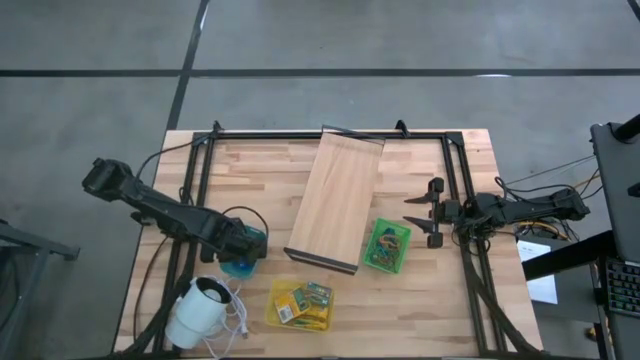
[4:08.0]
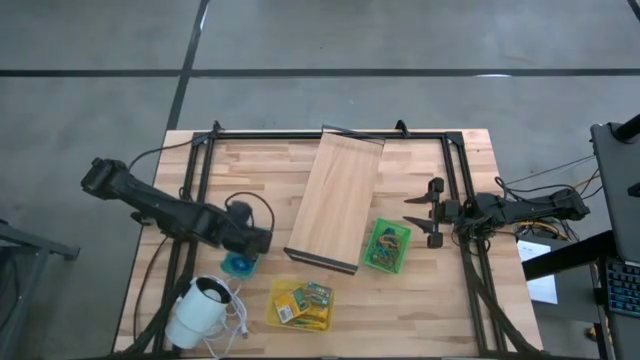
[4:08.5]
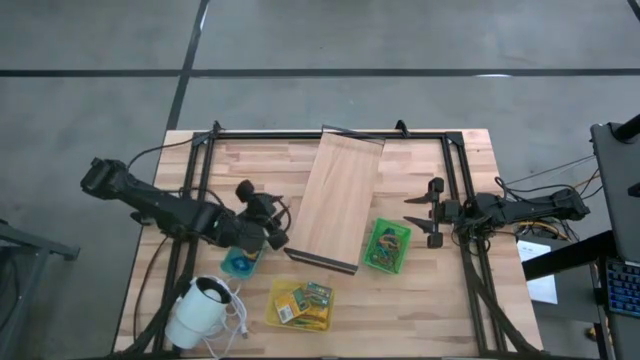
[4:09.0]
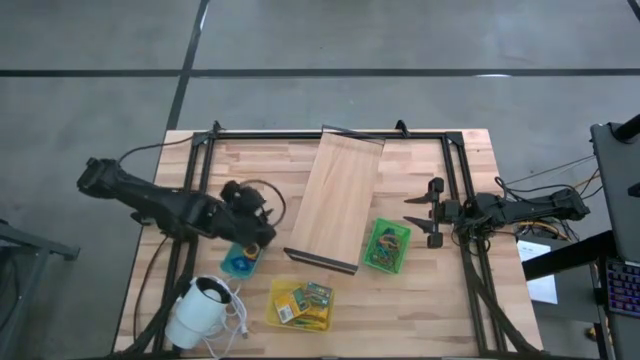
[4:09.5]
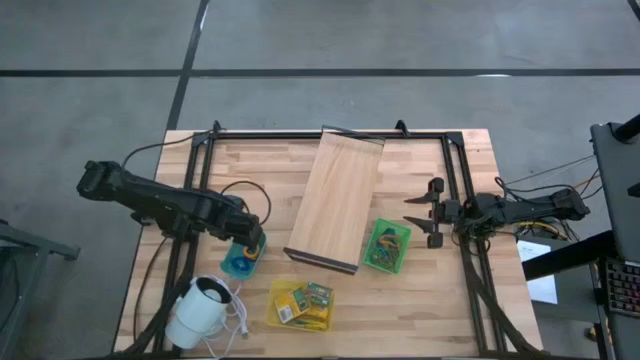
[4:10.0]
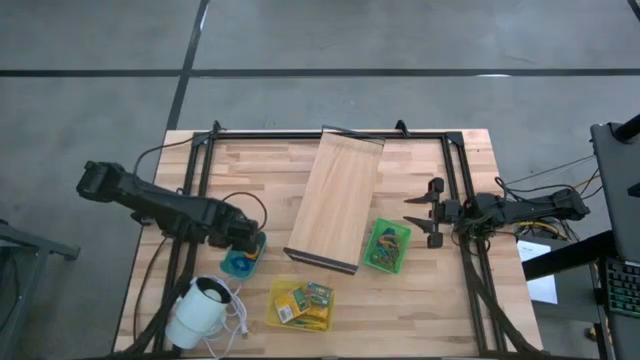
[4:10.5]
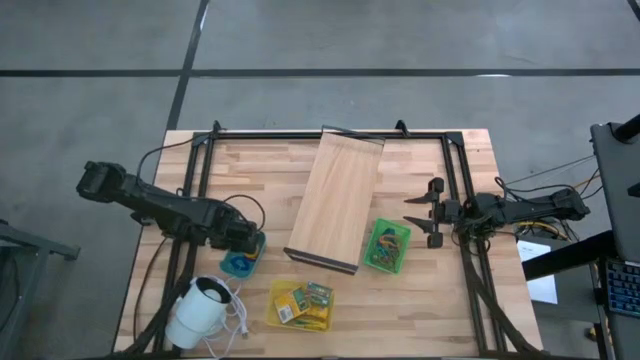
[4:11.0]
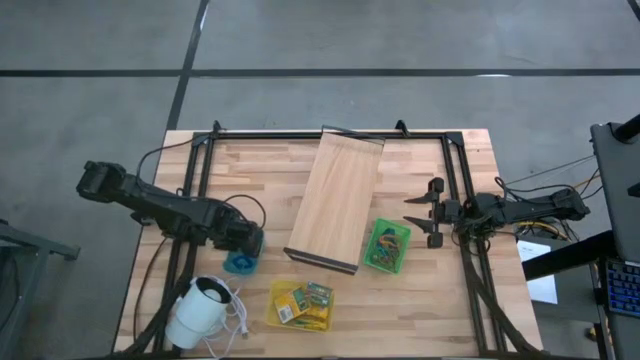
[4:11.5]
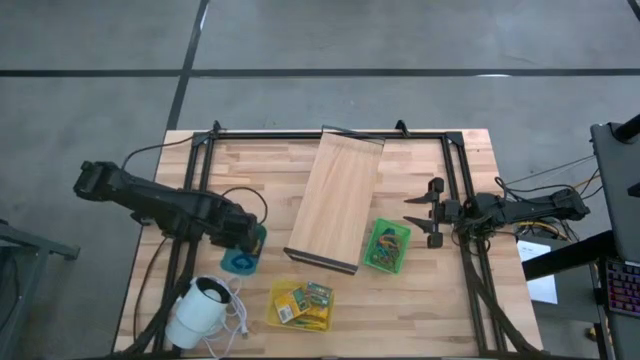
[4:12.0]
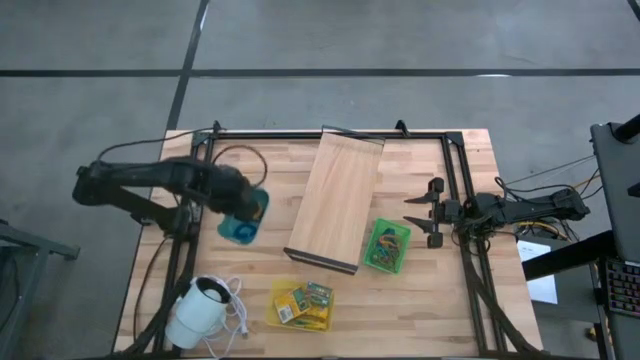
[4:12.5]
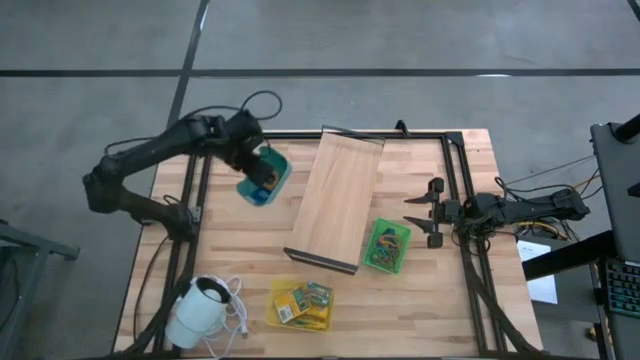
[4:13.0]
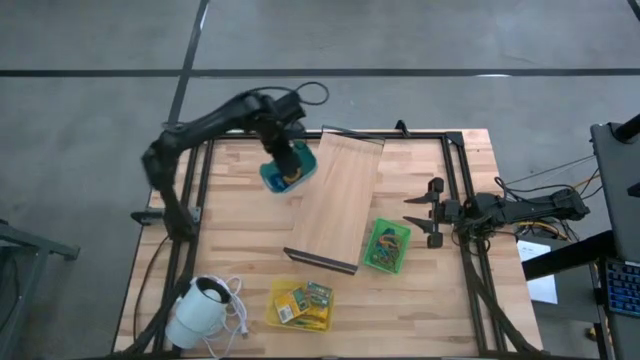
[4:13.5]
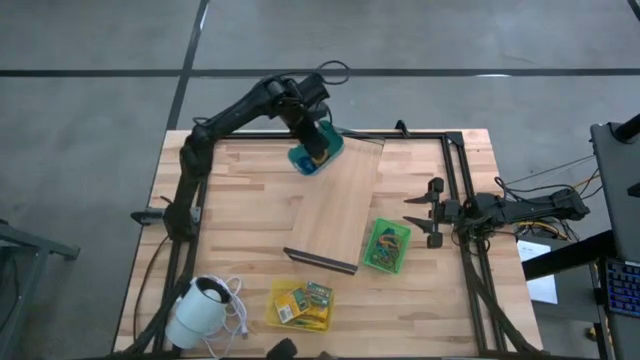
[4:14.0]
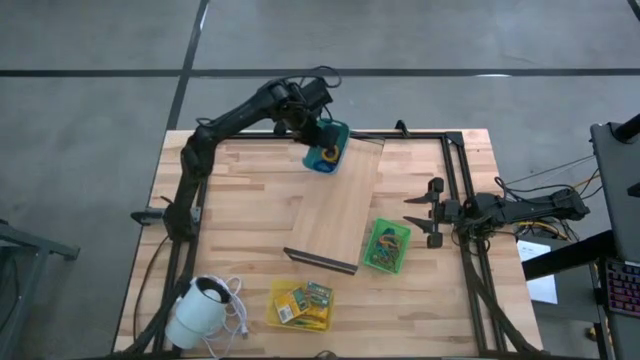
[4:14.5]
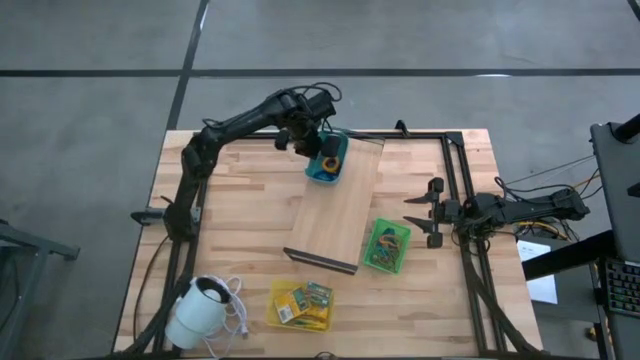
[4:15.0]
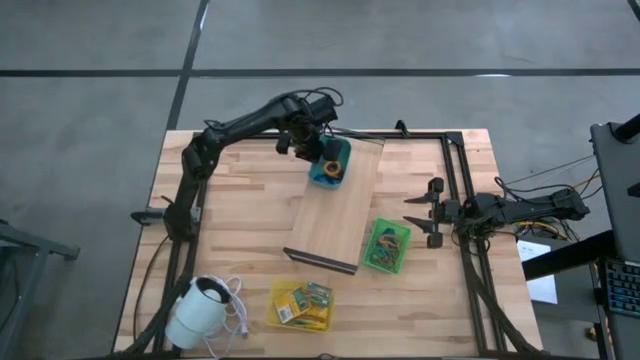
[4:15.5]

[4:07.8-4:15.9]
Task: Pick & Place Office Desk Supplies
Put the blue bin on the shelf

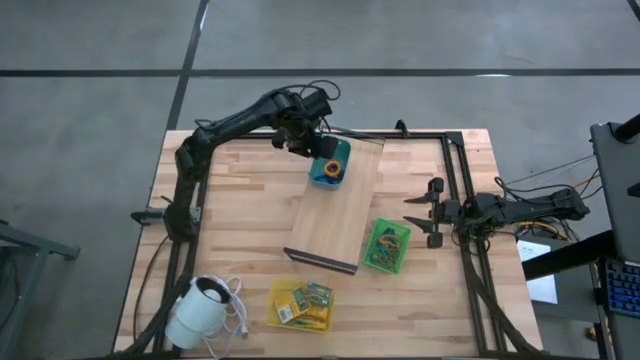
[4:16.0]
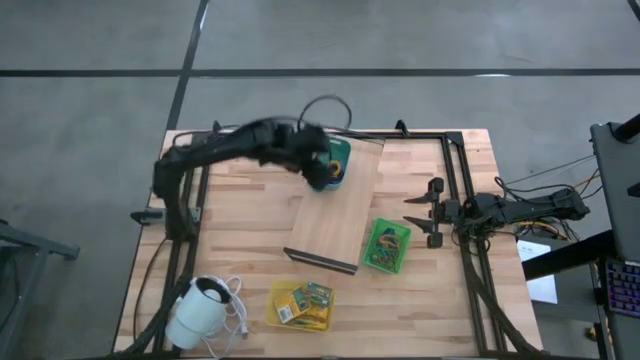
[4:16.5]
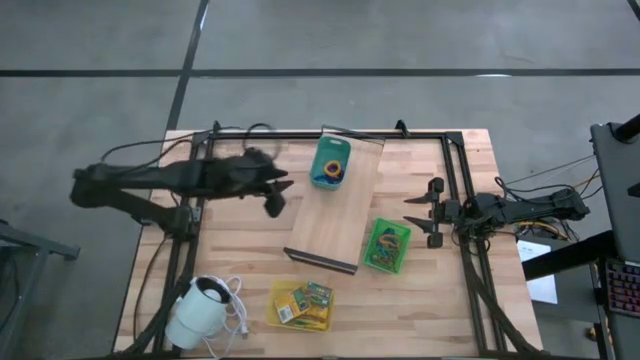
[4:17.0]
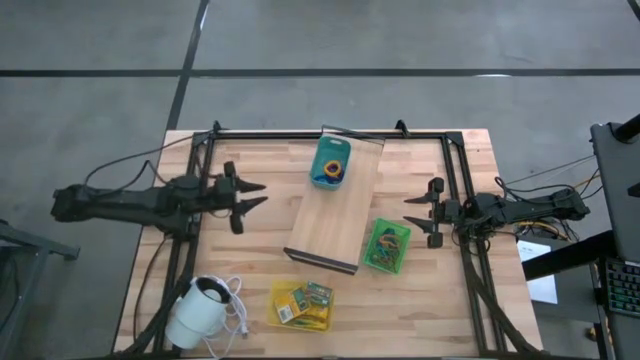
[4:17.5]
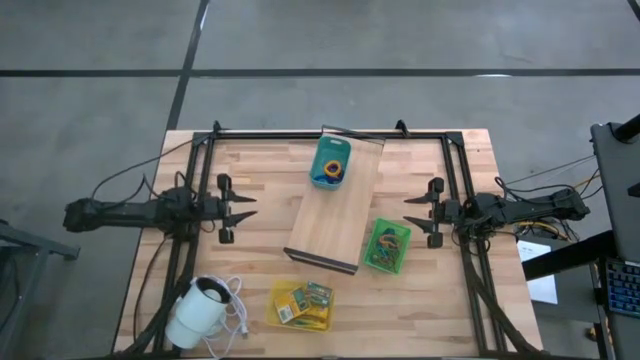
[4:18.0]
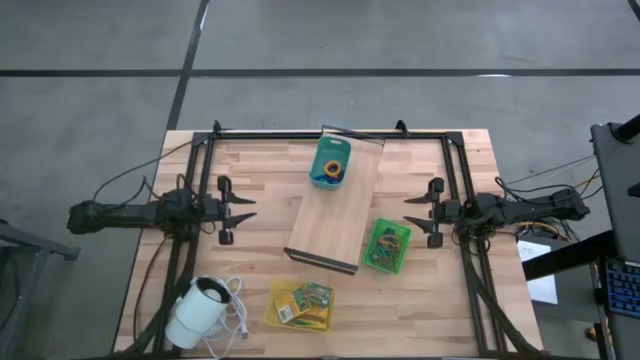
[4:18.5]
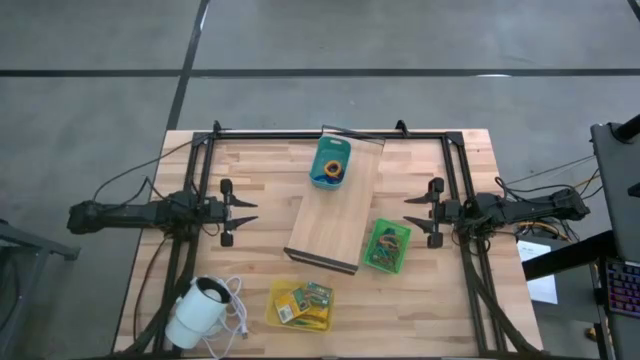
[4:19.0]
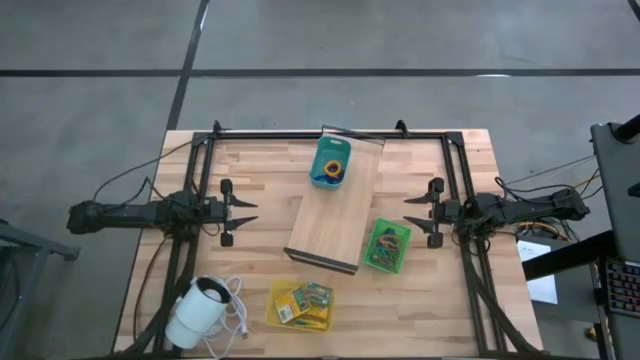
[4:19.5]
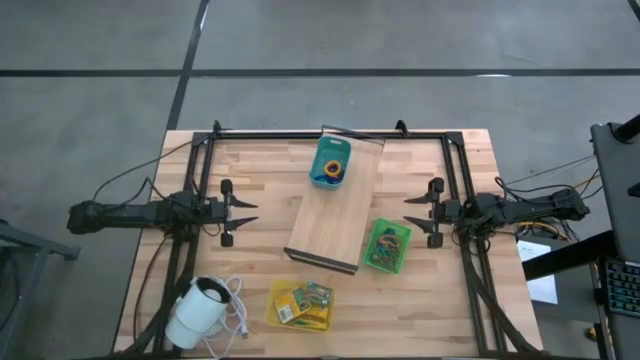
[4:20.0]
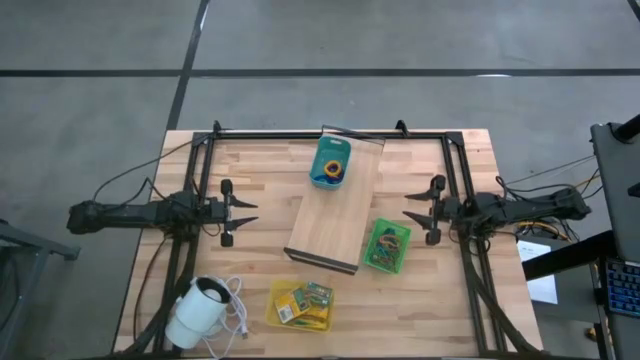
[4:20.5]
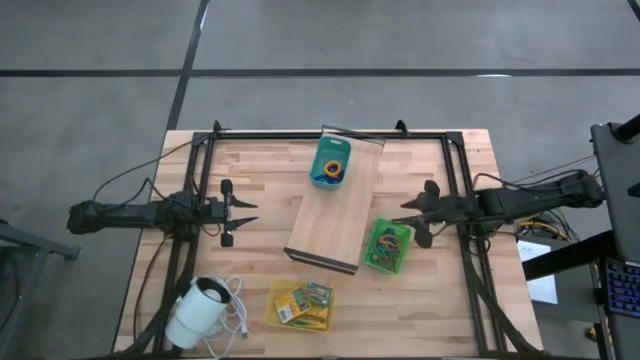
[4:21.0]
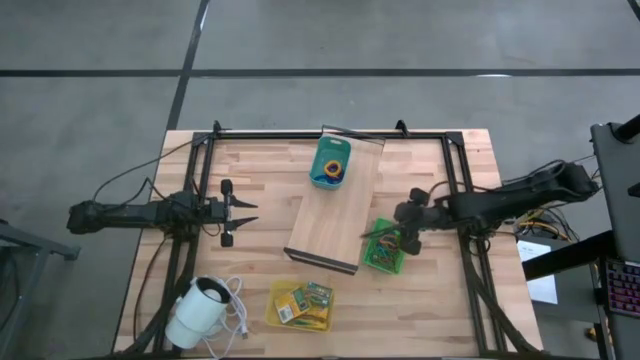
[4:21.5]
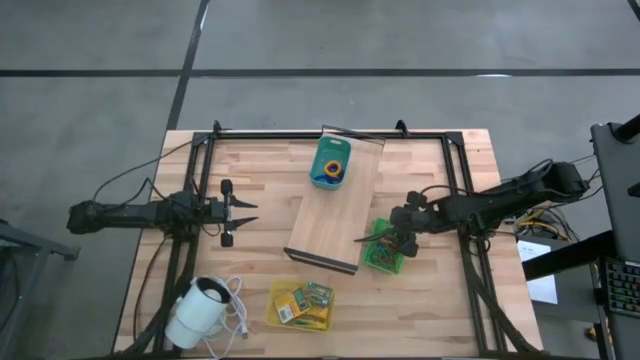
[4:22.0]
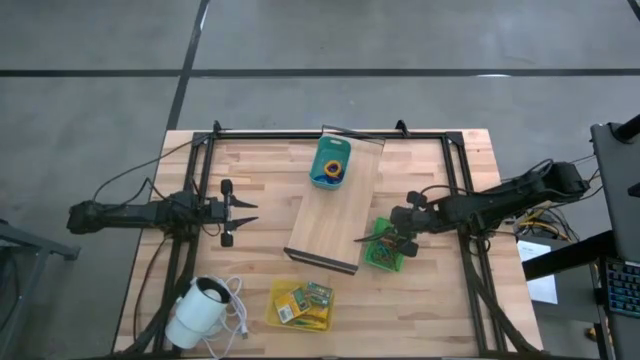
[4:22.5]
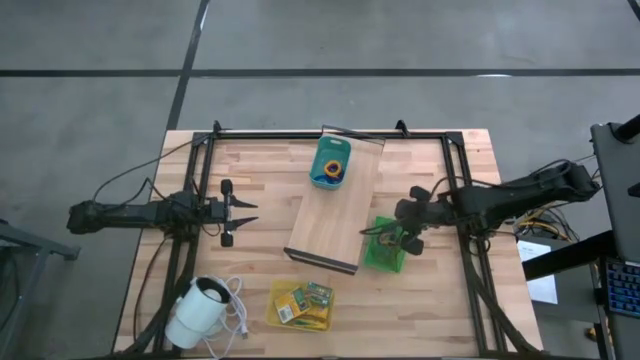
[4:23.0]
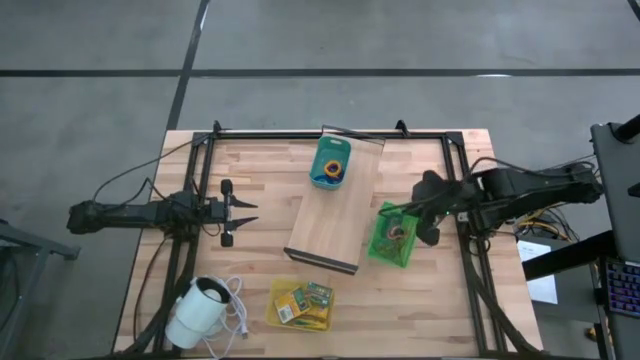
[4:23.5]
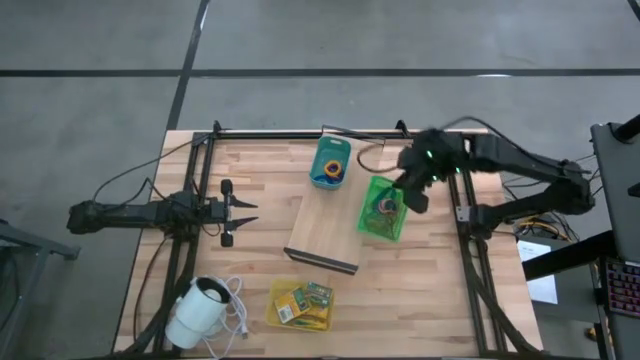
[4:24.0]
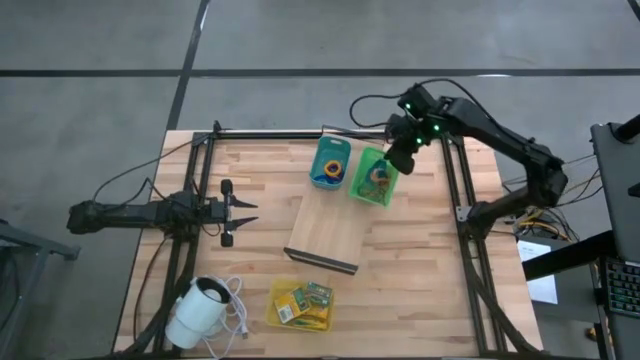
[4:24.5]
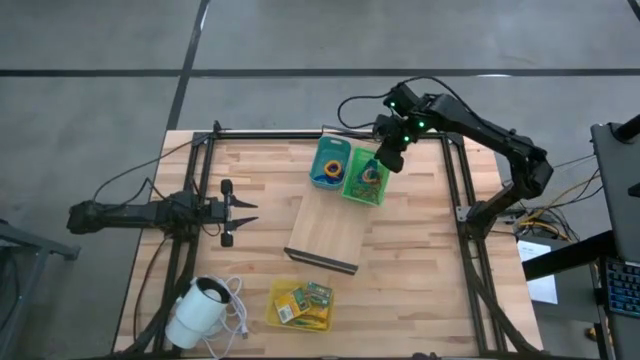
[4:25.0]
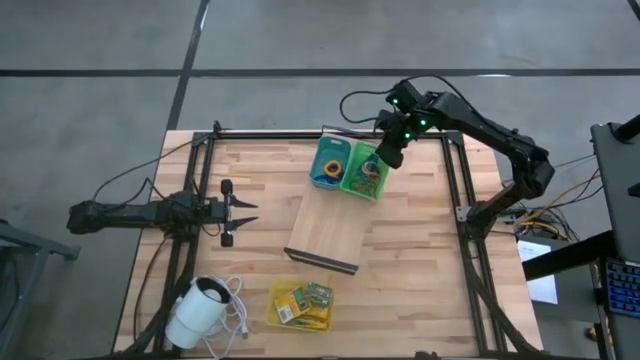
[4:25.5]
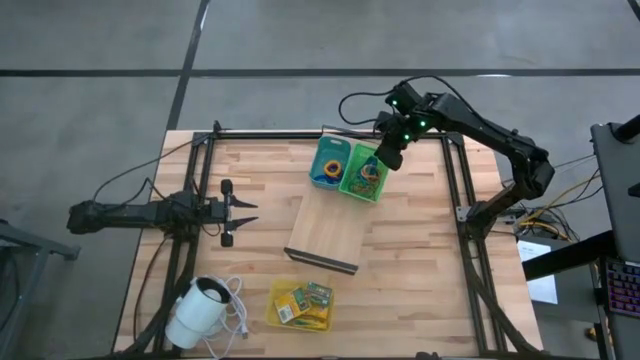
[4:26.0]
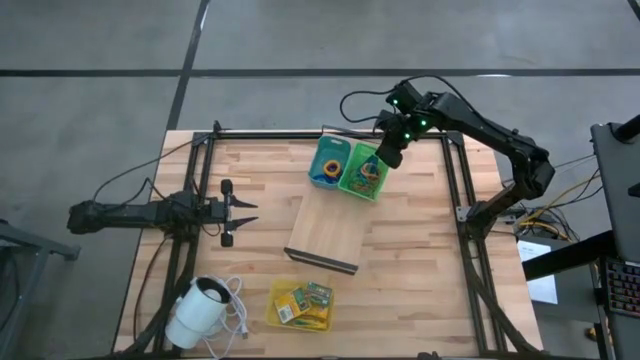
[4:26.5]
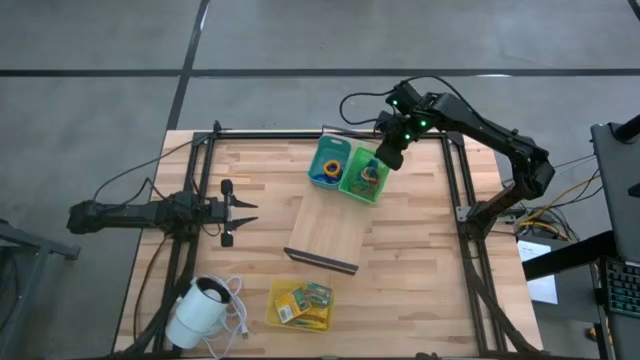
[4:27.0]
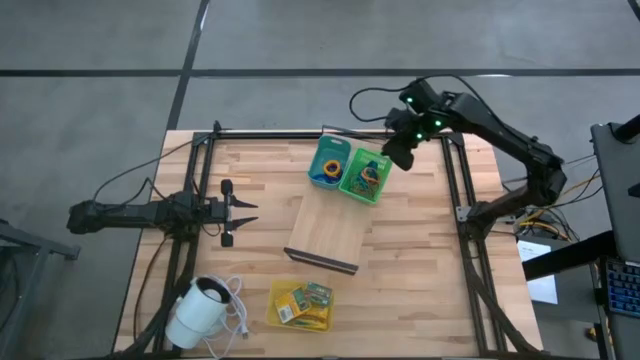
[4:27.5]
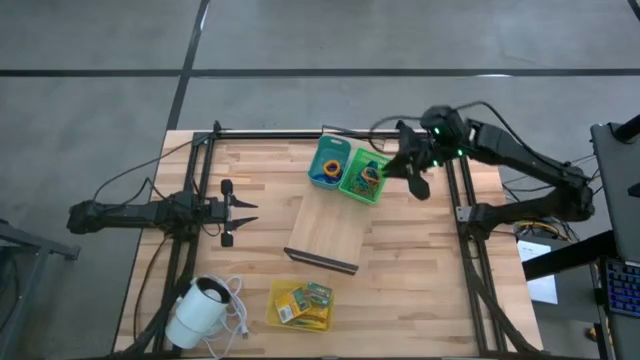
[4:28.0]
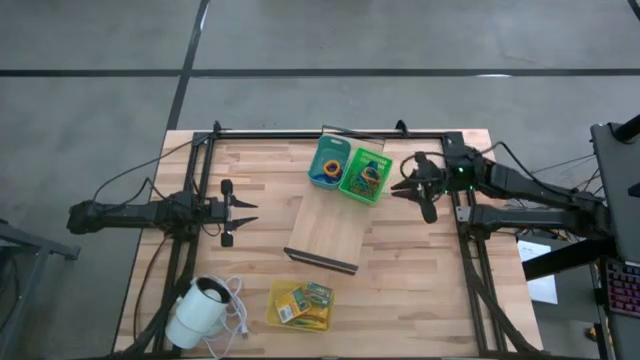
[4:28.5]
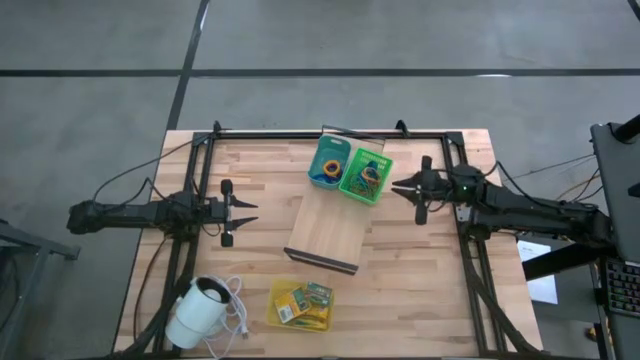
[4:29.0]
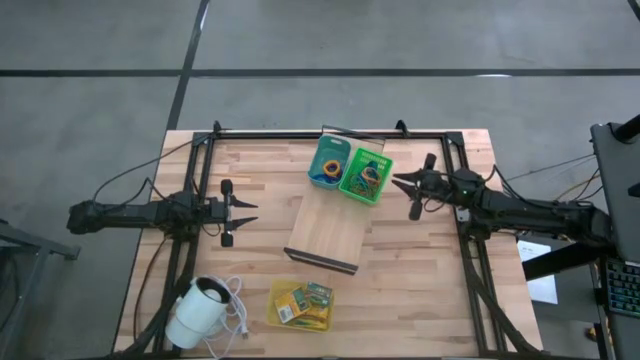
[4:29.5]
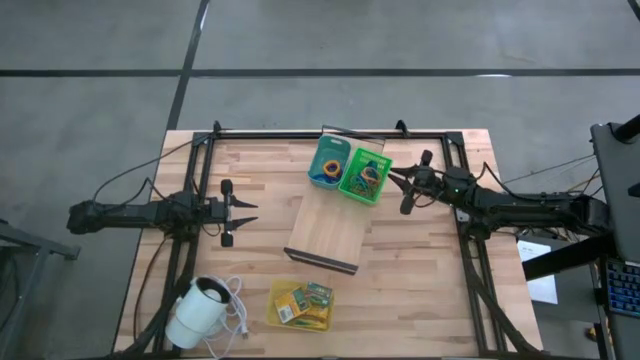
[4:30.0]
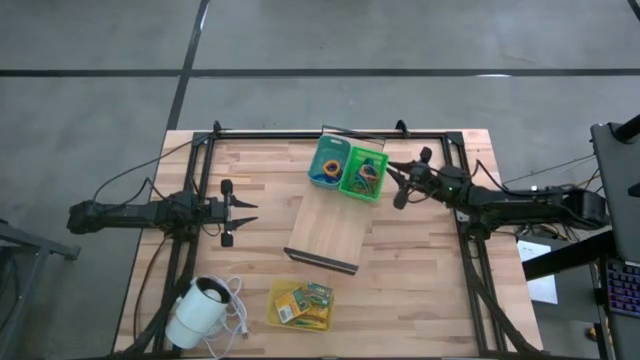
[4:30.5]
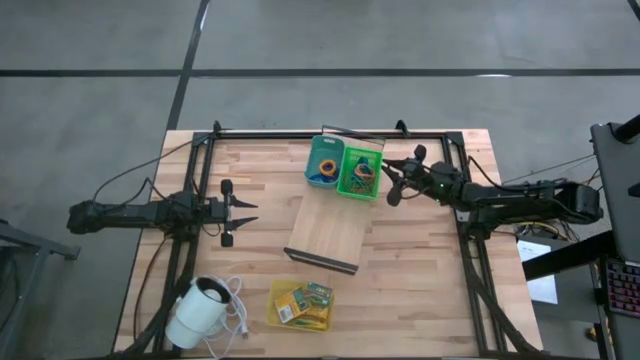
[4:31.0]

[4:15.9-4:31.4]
Put the green bin on the shelf
